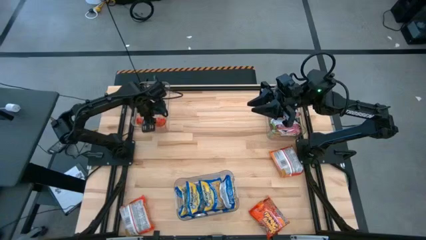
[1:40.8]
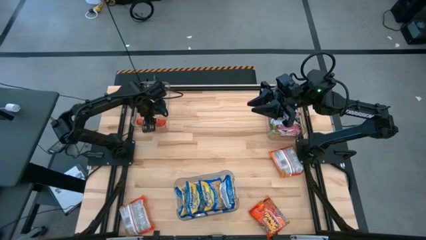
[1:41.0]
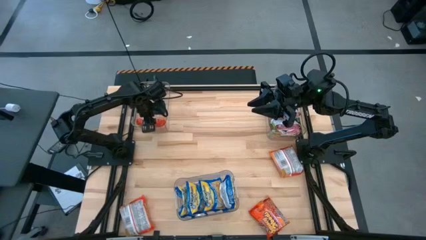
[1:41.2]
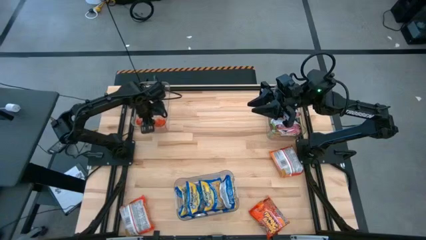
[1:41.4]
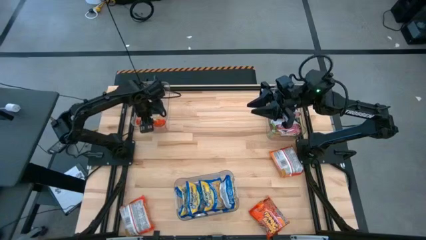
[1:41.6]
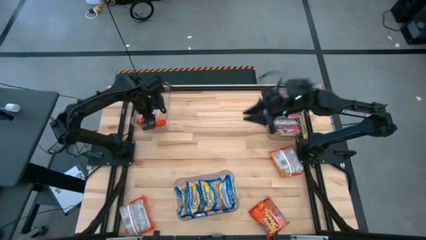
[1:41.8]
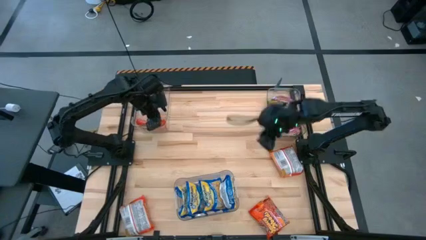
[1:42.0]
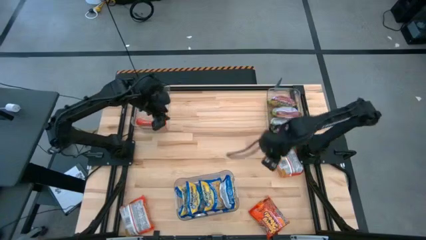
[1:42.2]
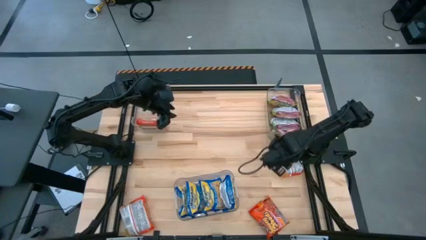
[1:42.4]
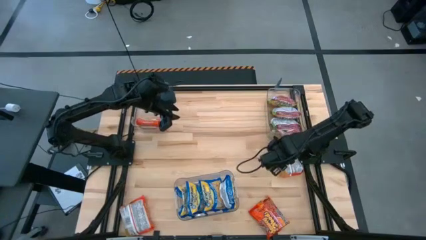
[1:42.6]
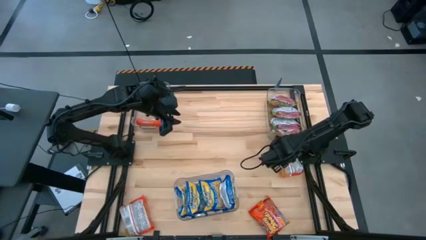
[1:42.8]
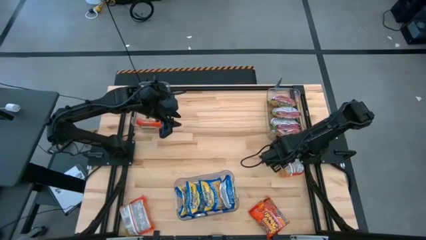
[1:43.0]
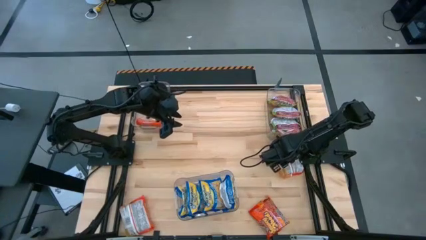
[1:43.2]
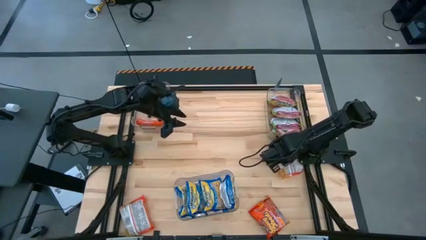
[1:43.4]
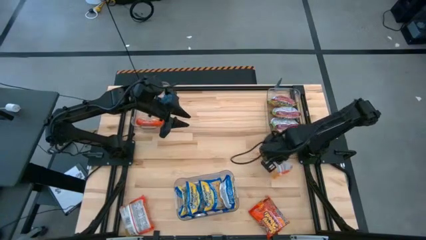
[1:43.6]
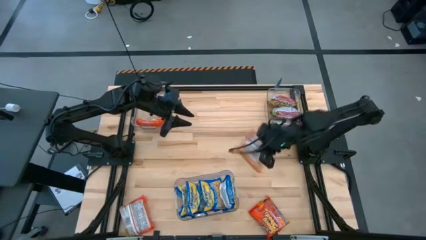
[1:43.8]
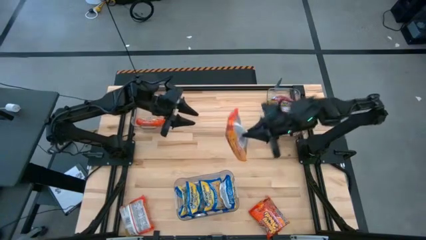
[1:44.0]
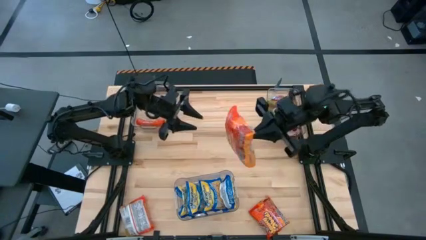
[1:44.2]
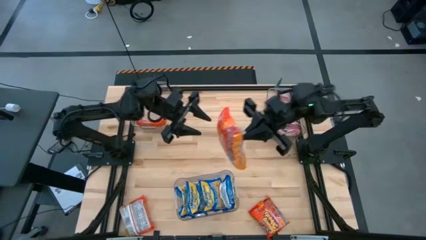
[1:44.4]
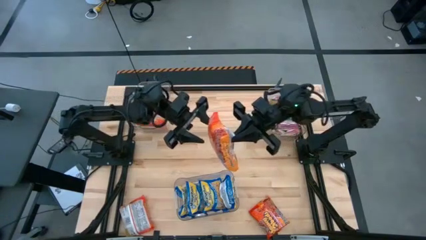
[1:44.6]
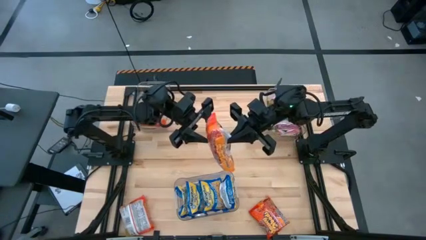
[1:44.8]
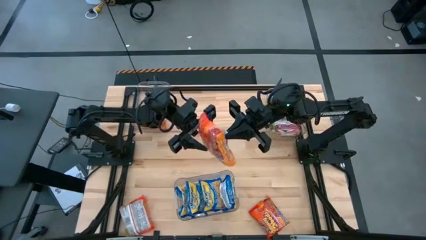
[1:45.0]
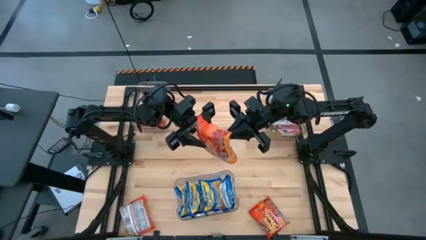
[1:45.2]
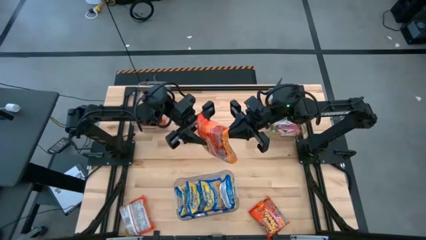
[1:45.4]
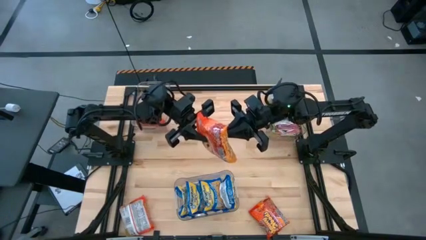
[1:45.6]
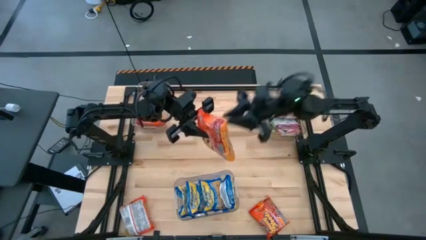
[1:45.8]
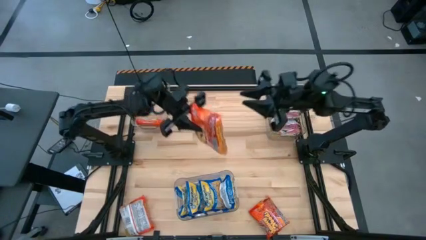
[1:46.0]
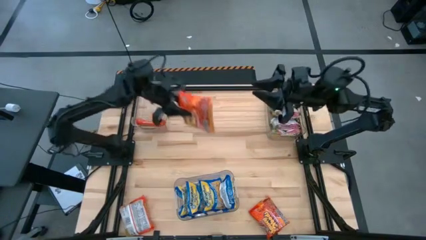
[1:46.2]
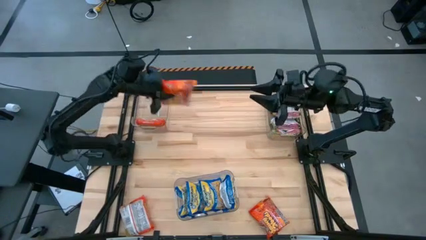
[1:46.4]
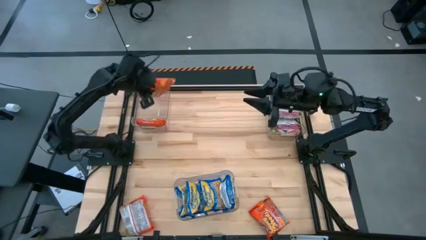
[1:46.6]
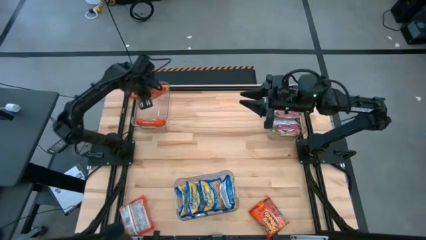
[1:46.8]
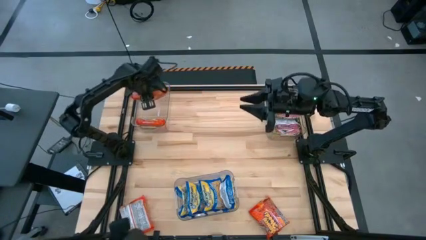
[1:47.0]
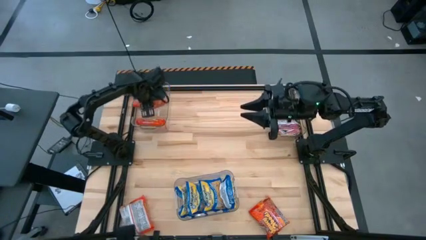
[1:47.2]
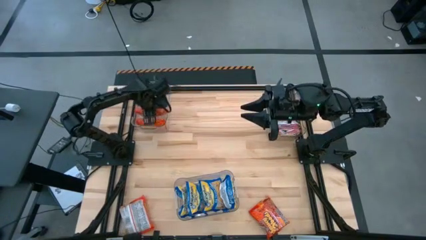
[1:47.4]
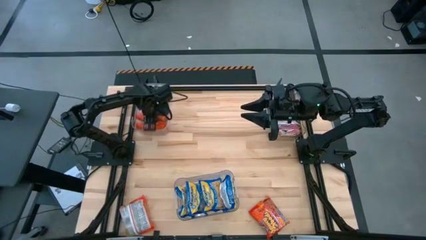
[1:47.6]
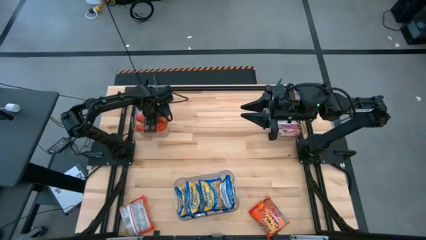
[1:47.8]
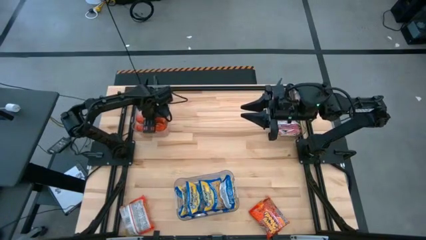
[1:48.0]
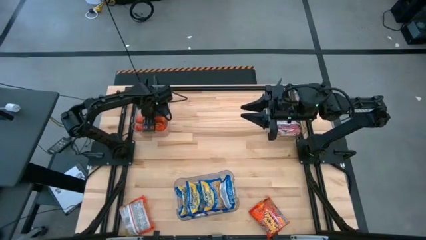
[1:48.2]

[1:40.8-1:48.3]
Task: Sort Maruchan noodles
Put the orange noodle pack into the top left transparent bin

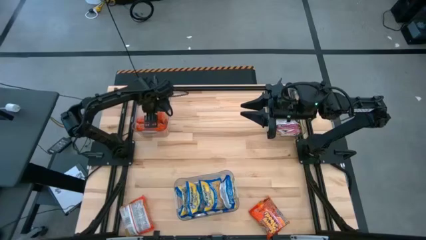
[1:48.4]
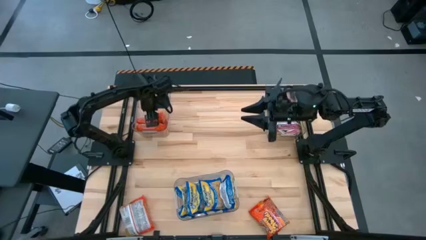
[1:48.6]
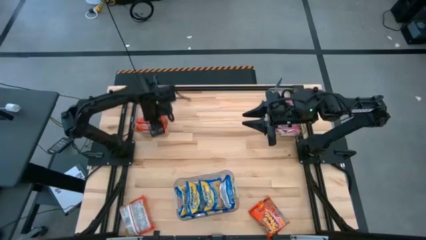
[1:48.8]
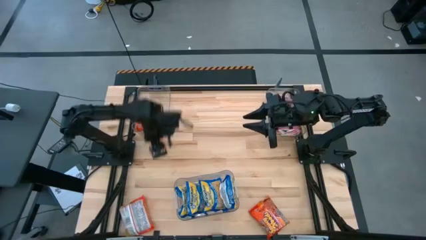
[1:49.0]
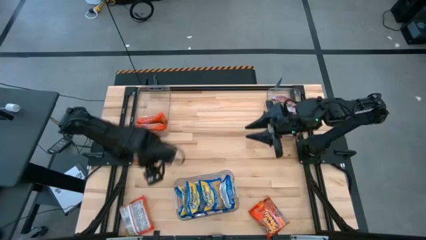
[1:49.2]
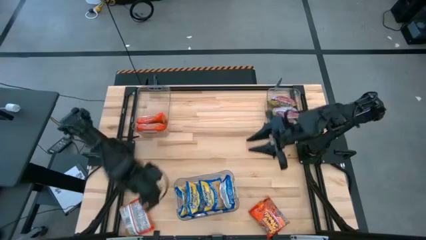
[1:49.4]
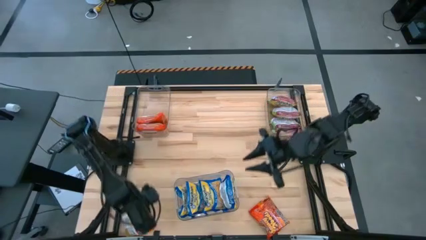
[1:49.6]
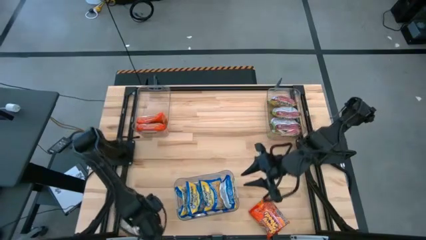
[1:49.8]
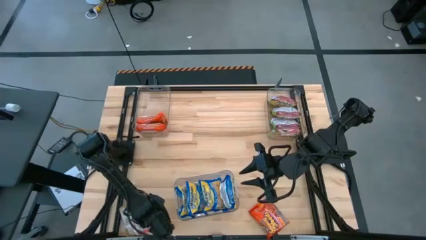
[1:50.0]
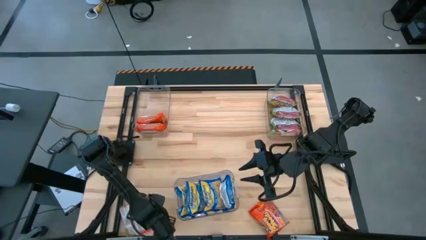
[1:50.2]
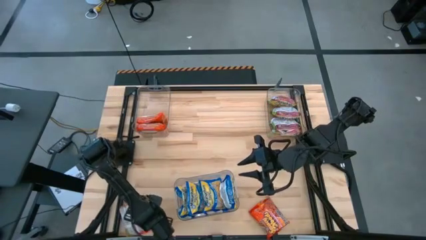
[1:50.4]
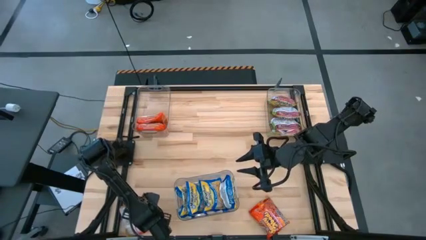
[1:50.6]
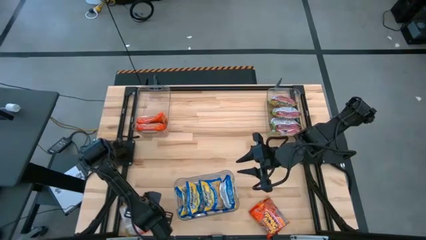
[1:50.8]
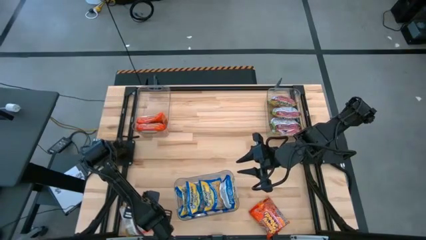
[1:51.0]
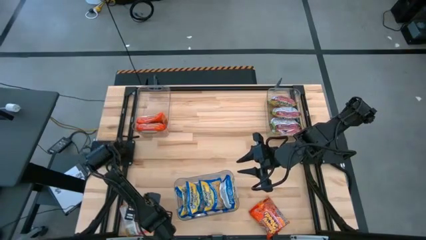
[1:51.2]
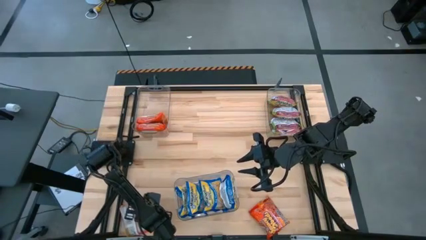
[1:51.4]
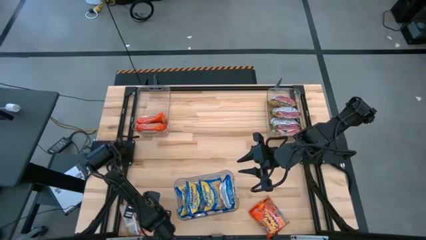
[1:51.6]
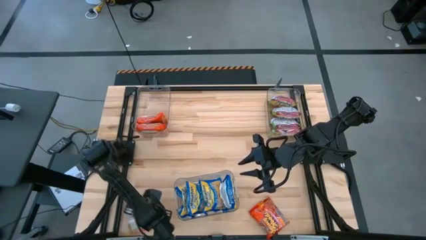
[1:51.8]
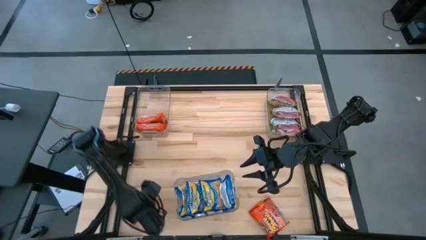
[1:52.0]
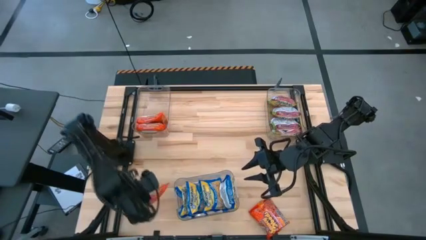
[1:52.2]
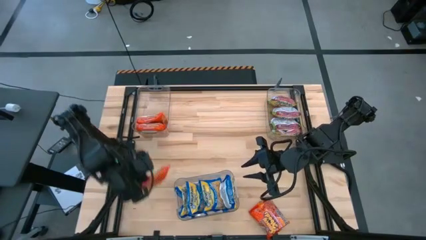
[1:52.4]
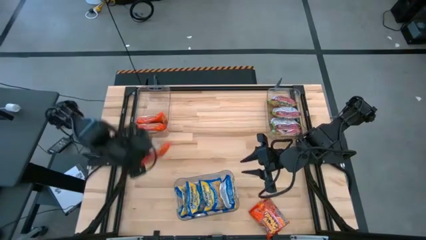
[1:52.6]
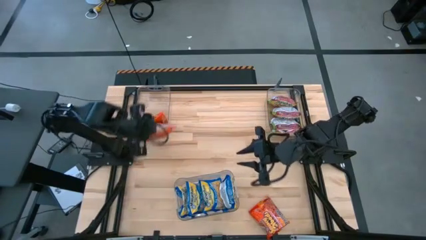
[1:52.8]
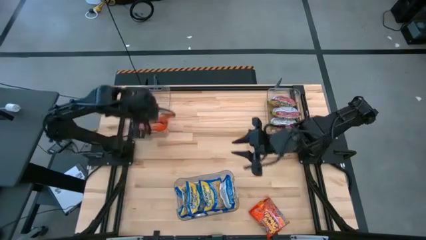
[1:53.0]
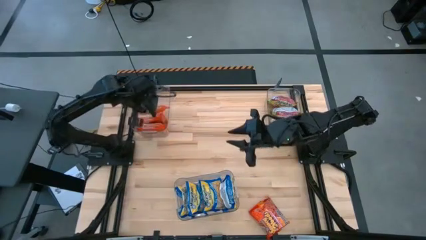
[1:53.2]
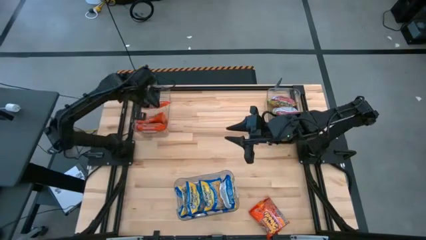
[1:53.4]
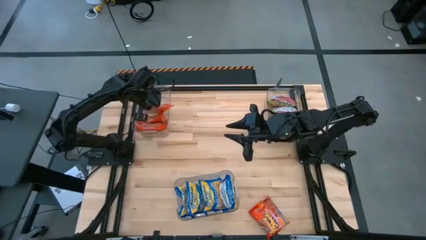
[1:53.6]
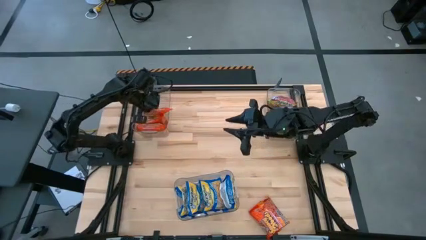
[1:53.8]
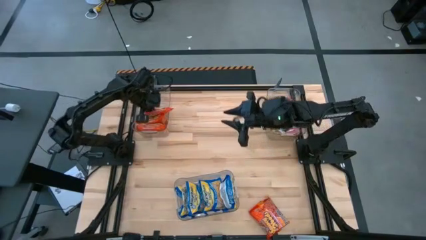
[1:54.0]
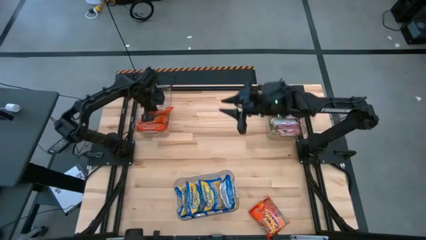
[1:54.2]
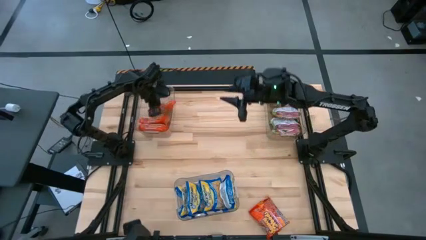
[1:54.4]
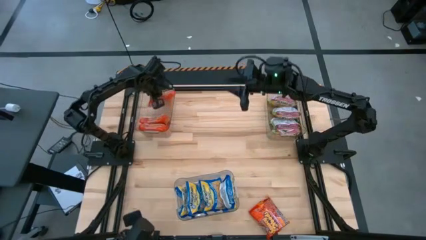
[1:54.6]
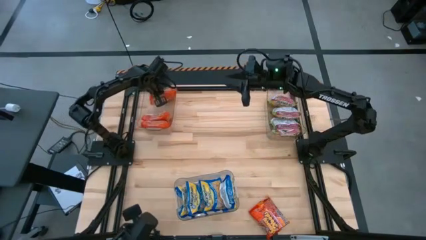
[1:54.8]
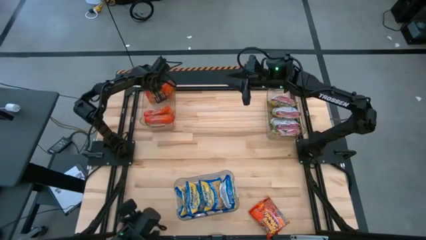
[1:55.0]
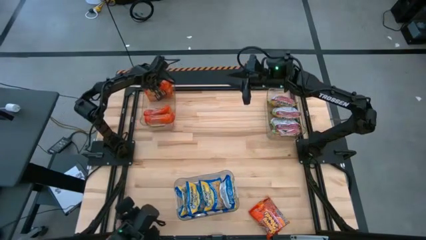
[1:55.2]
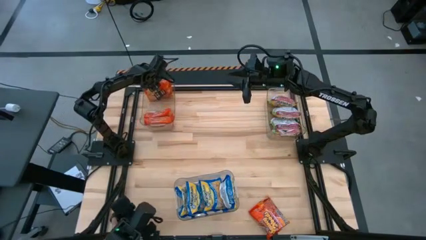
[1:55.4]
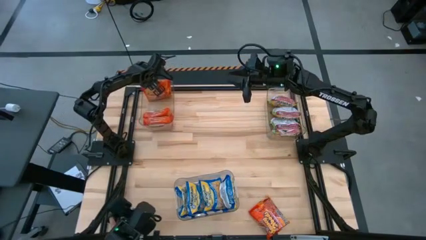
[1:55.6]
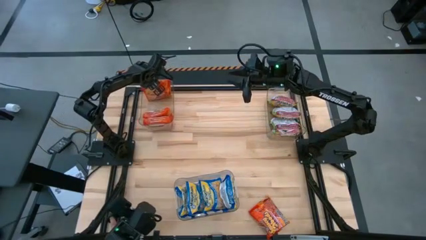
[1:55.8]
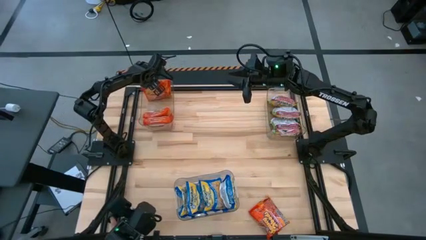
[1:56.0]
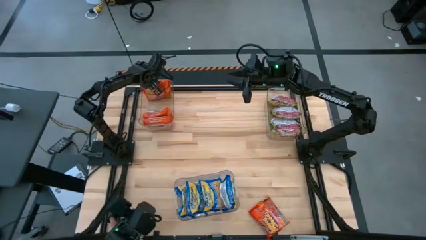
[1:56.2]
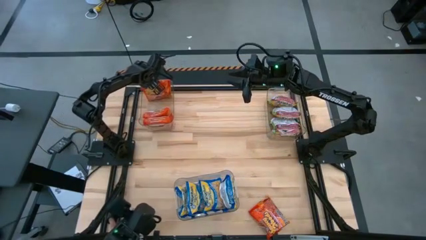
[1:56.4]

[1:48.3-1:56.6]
Put the orange noodle pack into the top left transparent bin

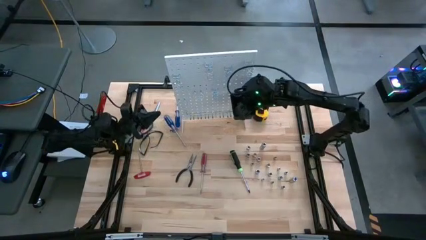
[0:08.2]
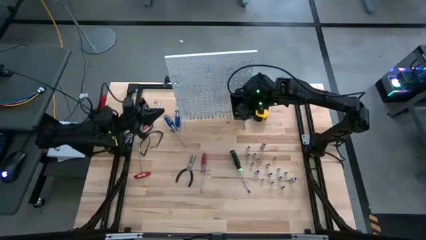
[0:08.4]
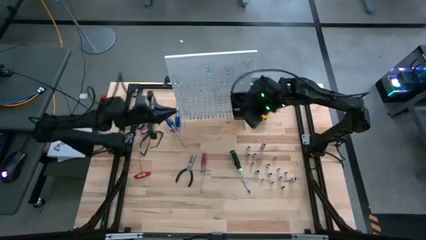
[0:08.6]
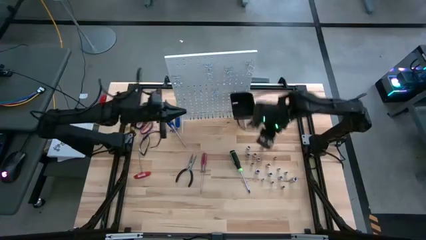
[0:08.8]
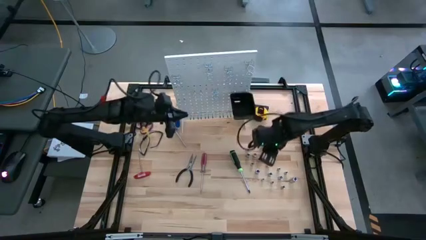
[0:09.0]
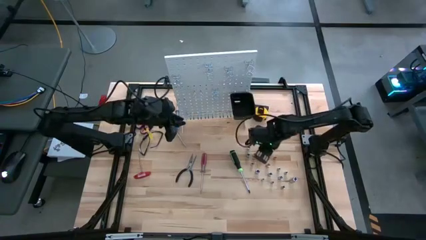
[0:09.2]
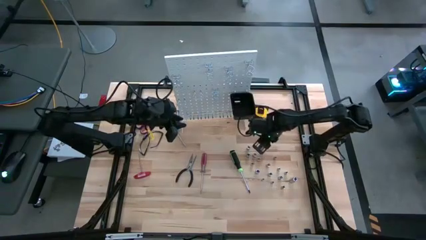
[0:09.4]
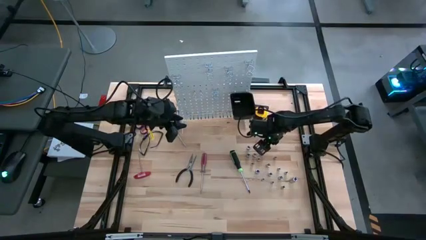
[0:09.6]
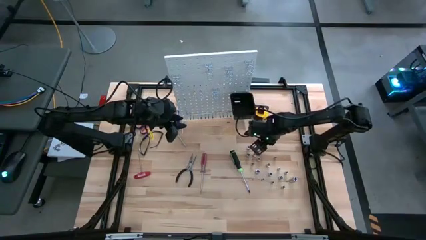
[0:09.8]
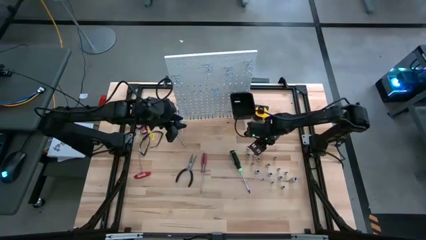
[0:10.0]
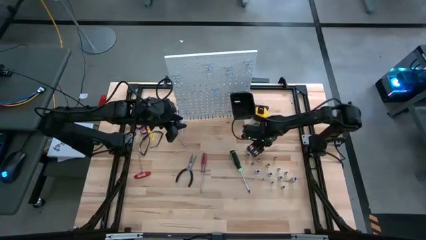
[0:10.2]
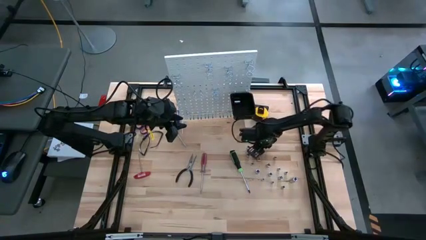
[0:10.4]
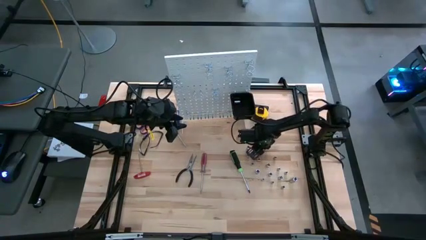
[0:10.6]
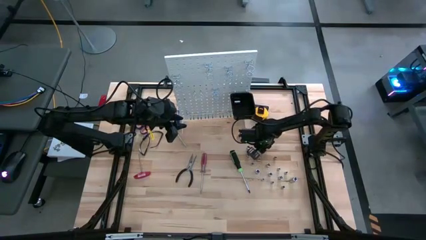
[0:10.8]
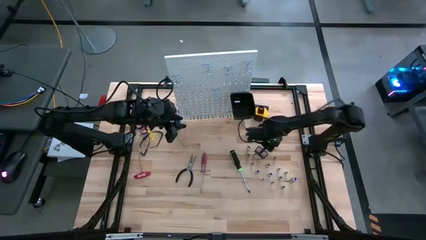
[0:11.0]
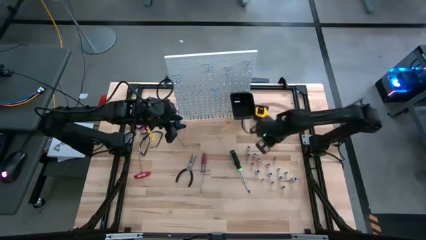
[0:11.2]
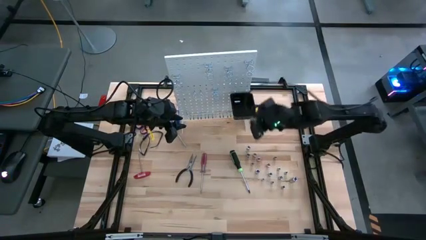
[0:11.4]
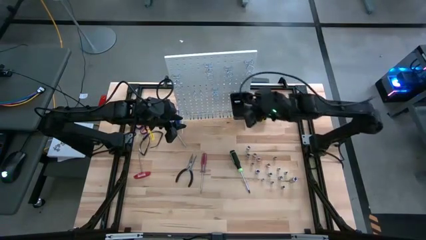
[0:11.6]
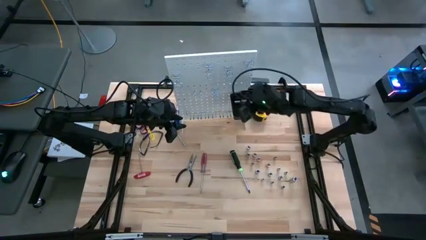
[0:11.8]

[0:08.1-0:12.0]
Task: Hang tools onto peg board
Put the silver extension bar into the black bin on the peg board
